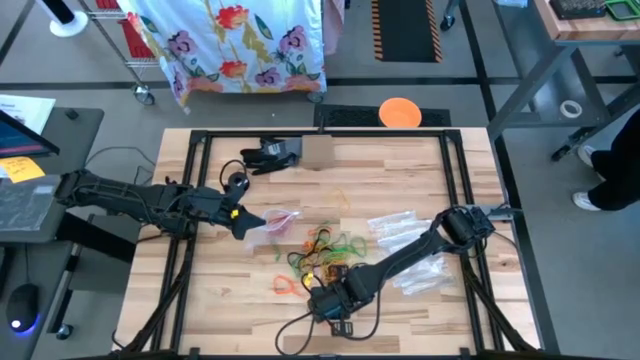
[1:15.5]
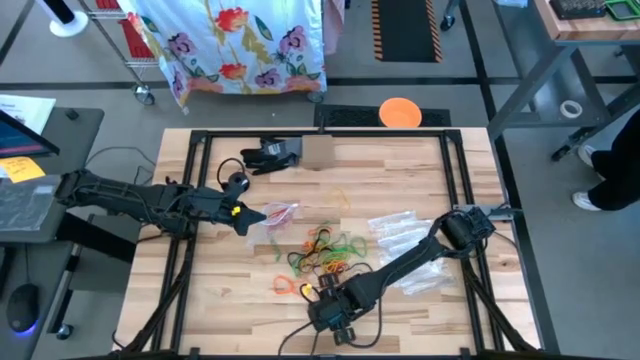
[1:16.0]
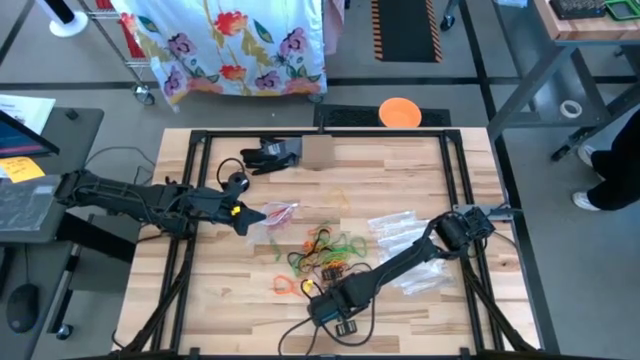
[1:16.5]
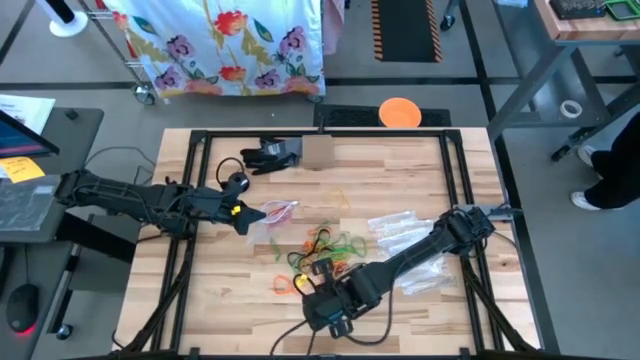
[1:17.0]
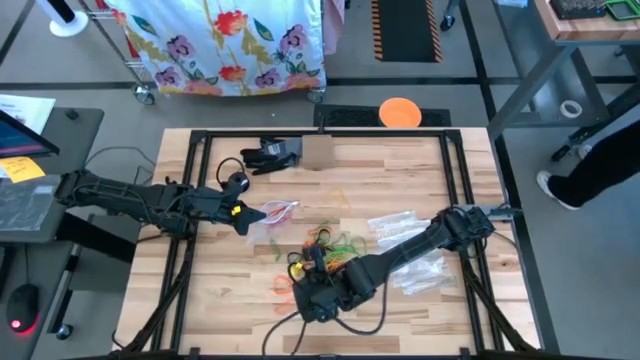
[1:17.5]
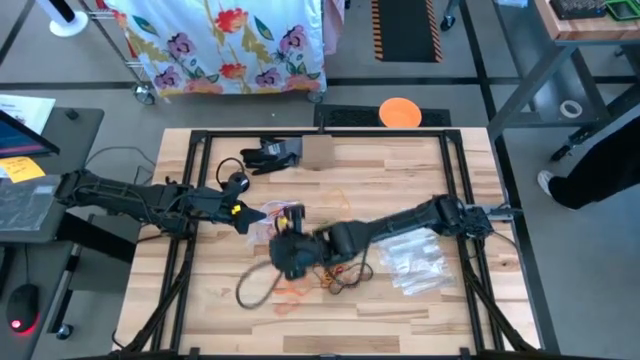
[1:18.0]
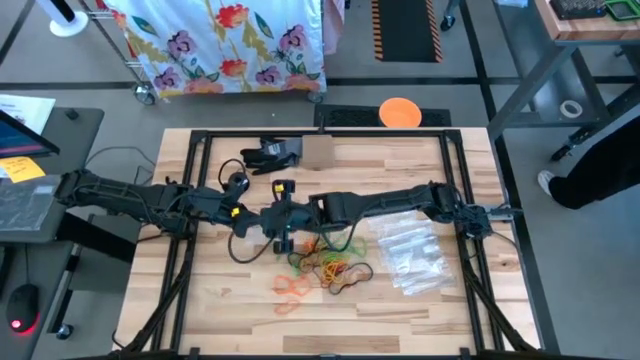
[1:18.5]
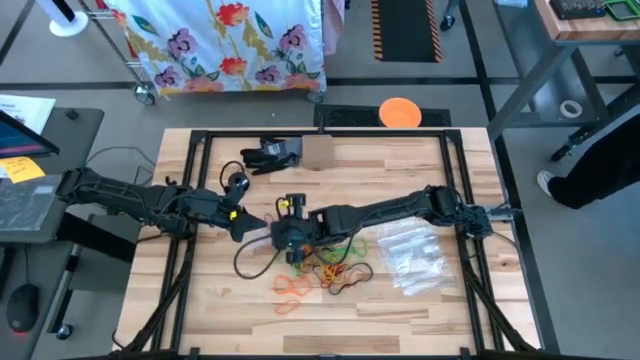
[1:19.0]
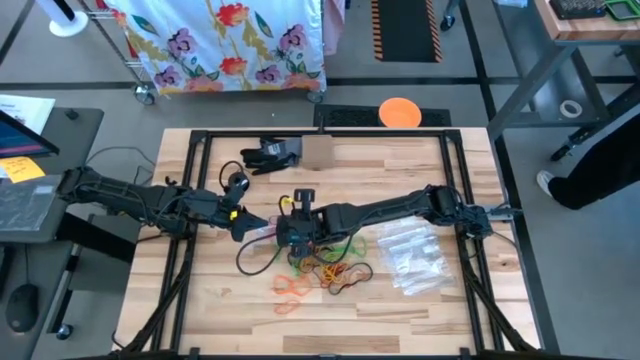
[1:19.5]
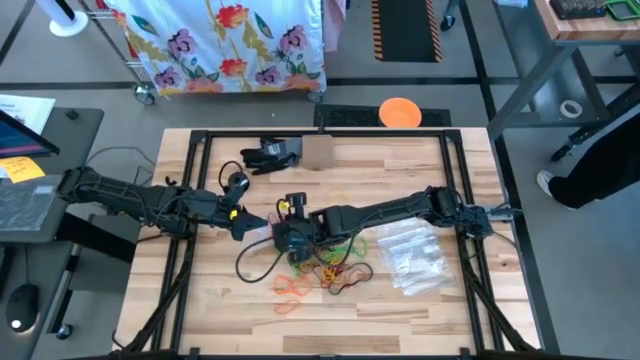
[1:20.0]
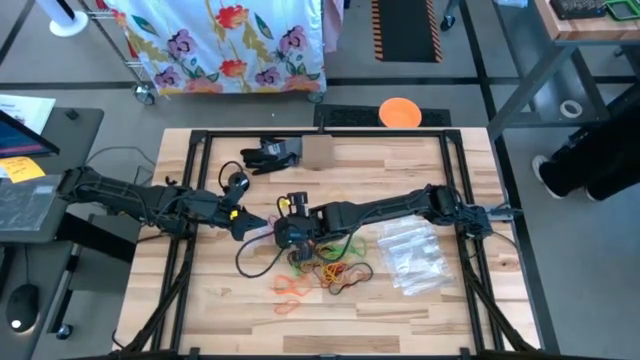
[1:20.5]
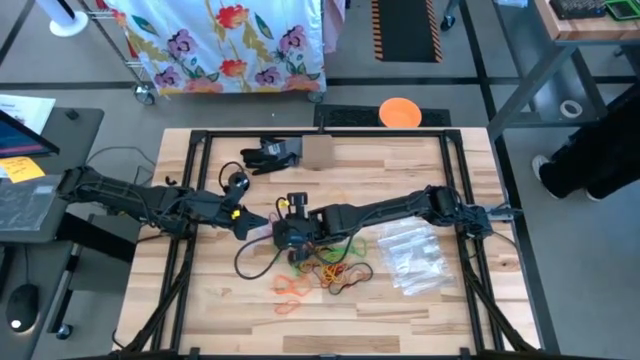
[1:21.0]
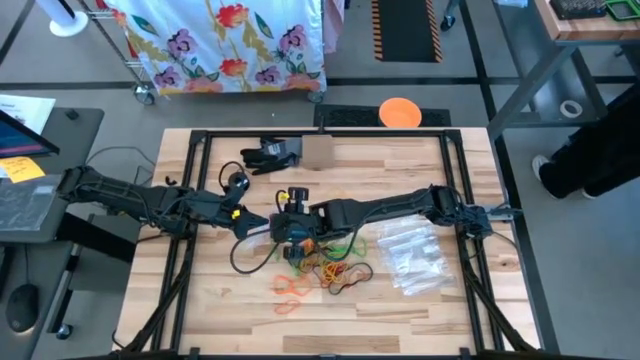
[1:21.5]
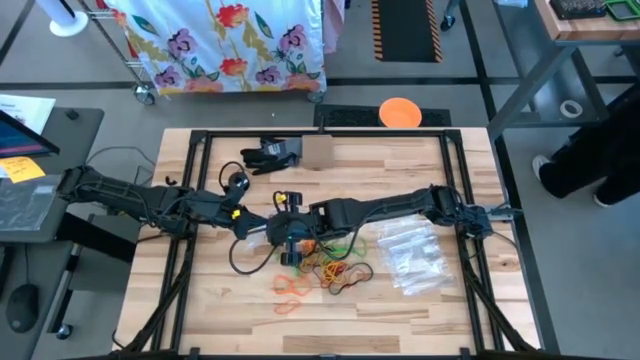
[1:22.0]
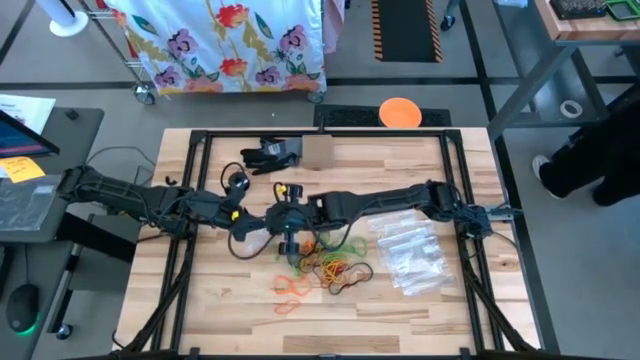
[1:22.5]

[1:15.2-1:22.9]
Task: Sort rubber bands
Put the red rubber band into the transparent zip bag

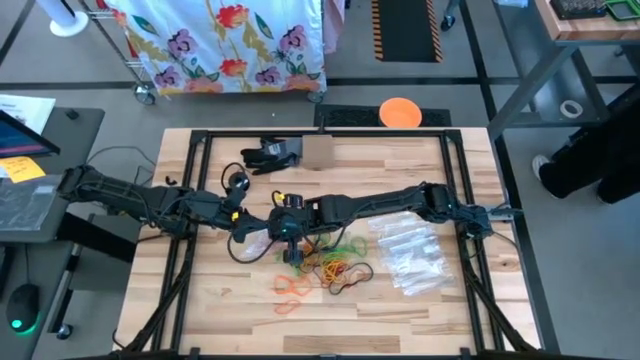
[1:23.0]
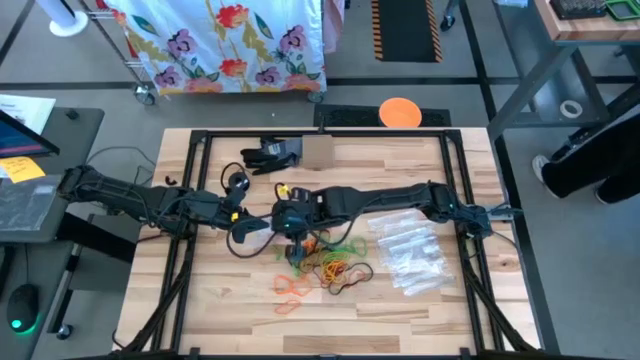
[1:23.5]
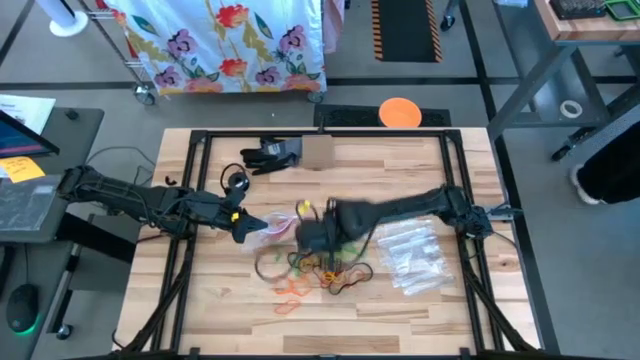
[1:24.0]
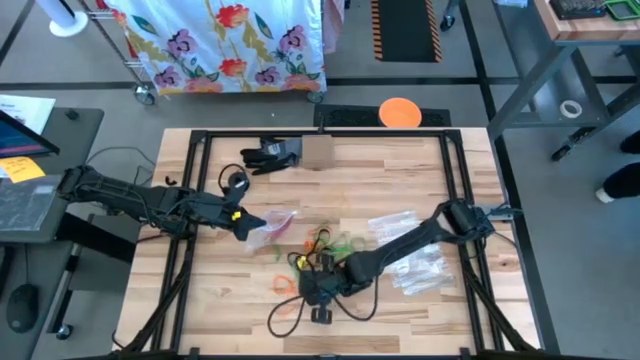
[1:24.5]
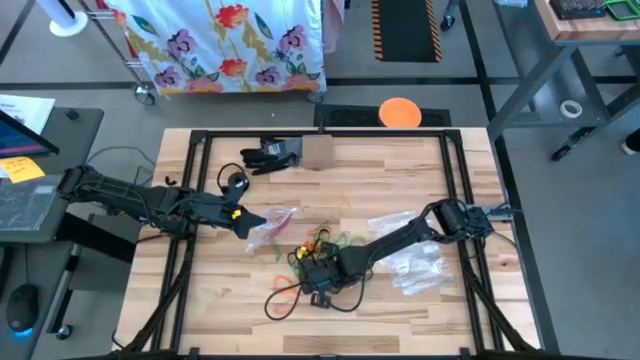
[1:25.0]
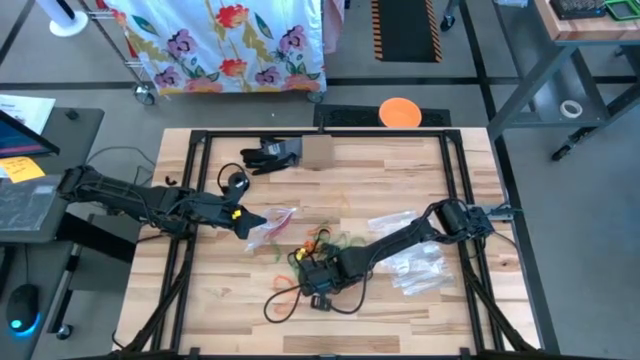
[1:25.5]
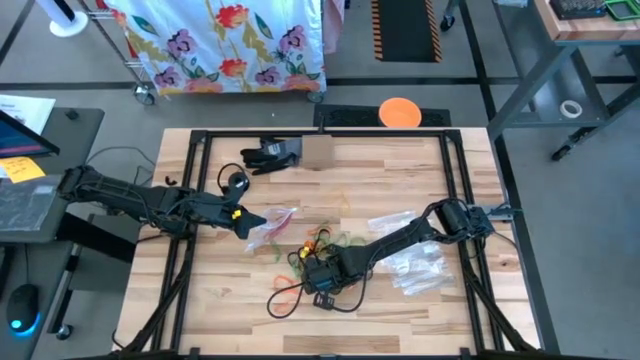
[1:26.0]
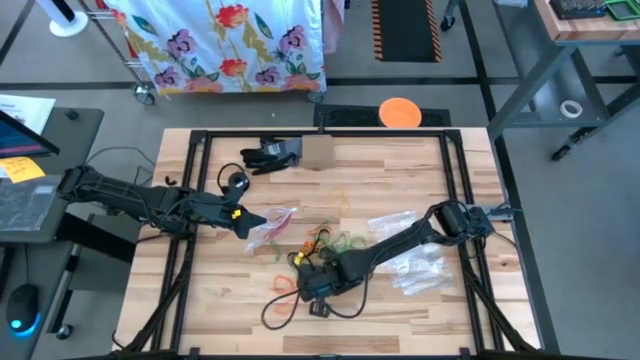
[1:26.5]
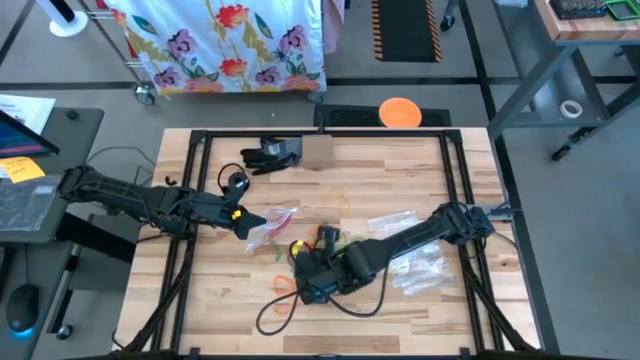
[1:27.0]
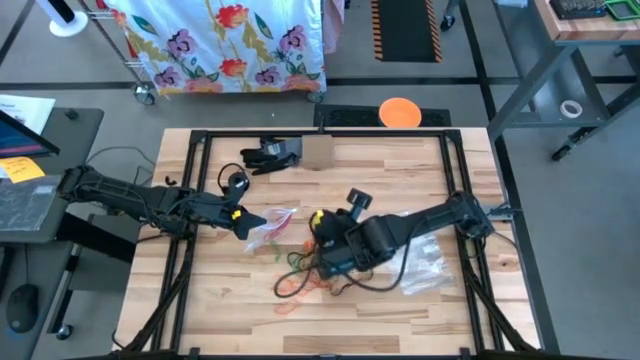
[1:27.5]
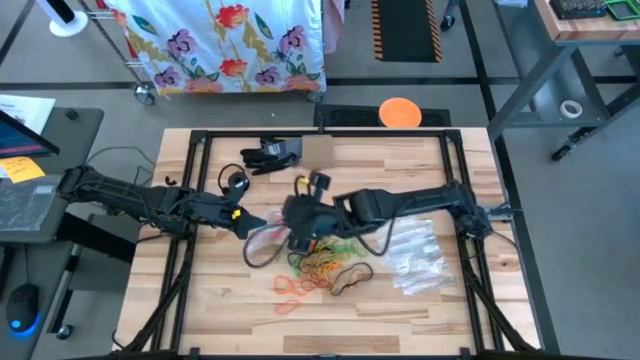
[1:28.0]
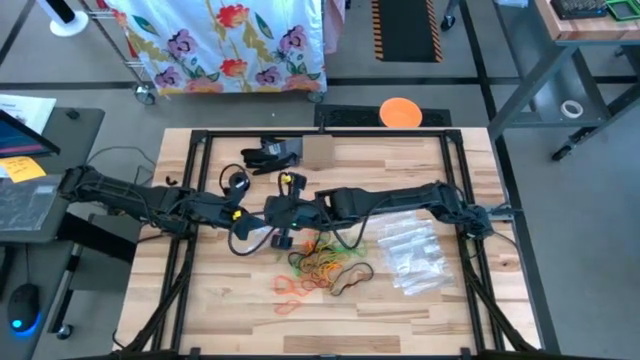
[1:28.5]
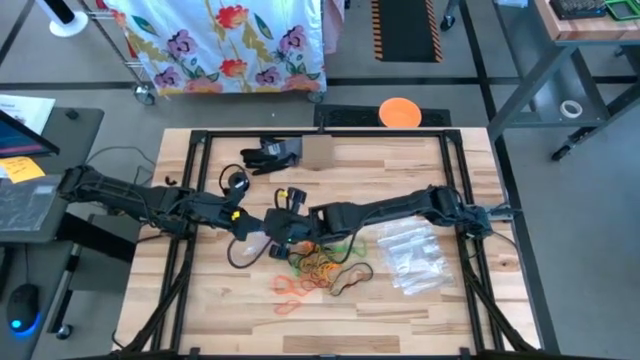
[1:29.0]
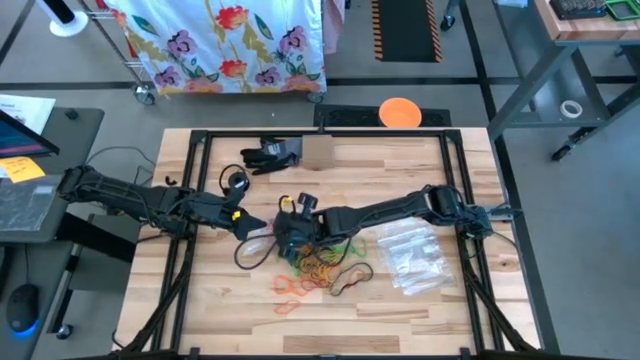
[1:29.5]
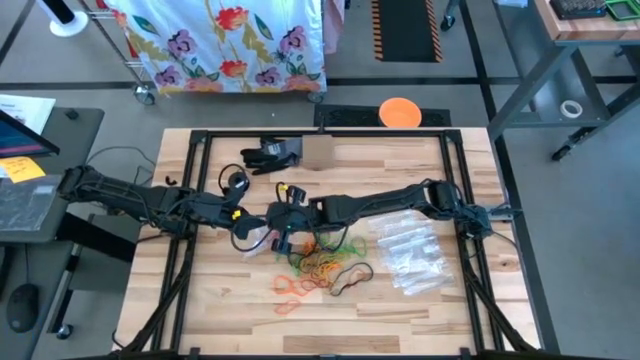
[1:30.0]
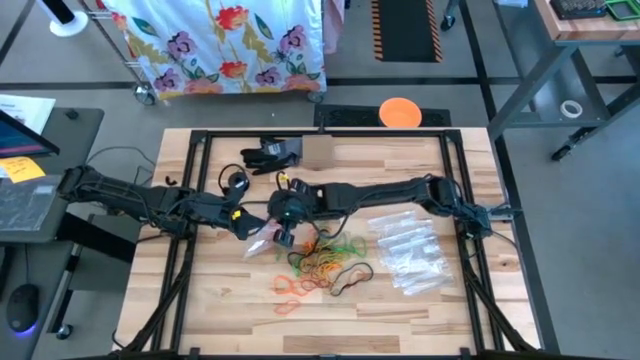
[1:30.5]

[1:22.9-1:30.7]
Put the red rubber band into the transparent zip bag

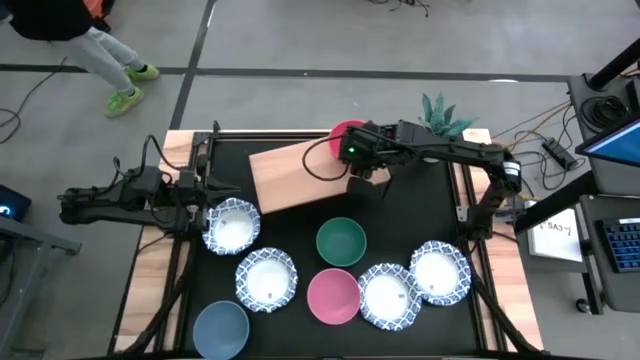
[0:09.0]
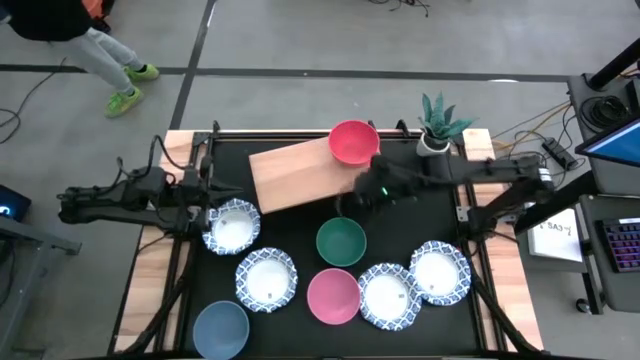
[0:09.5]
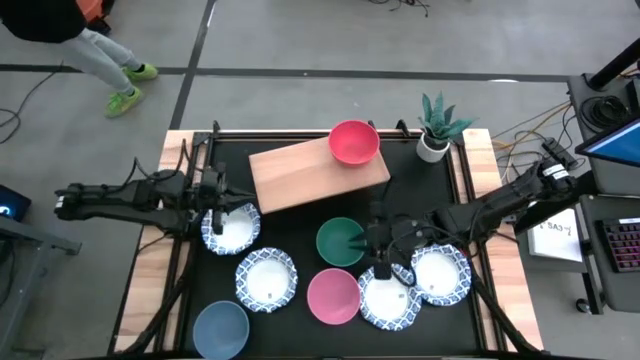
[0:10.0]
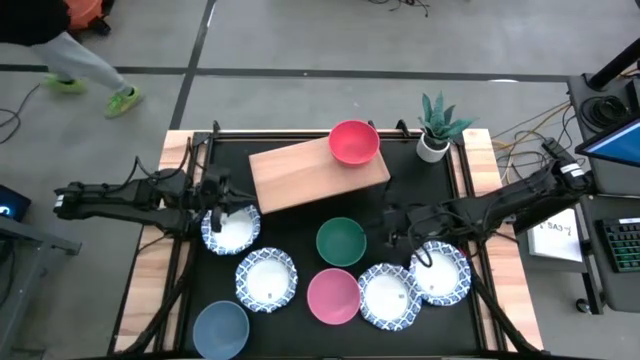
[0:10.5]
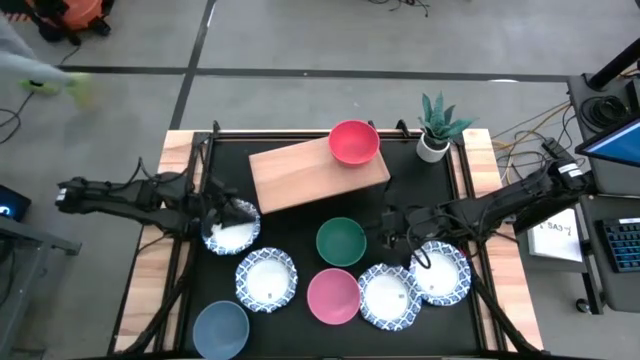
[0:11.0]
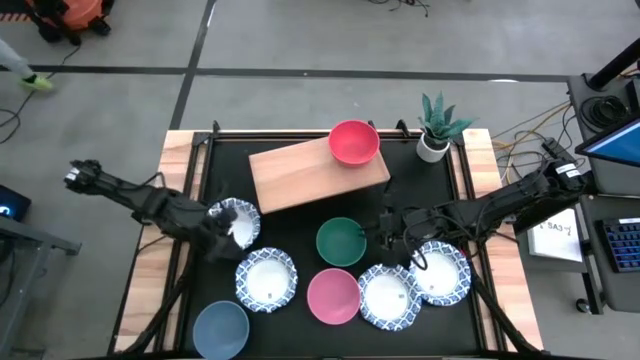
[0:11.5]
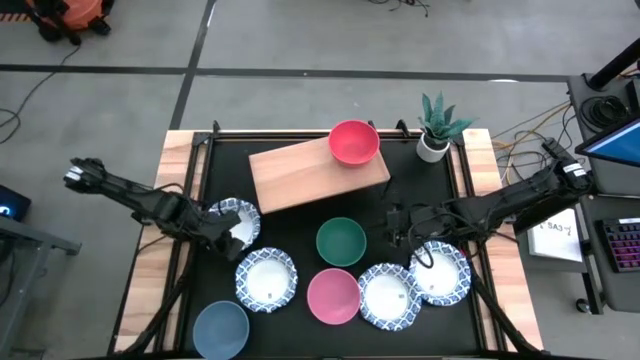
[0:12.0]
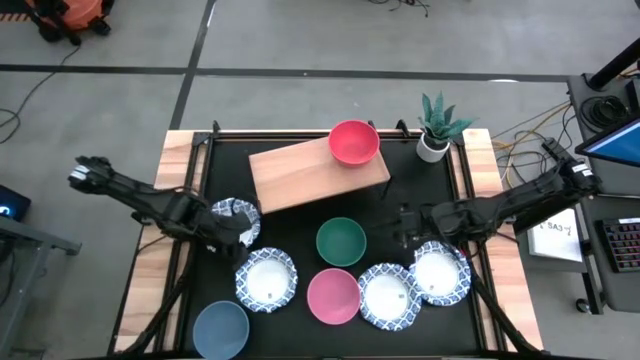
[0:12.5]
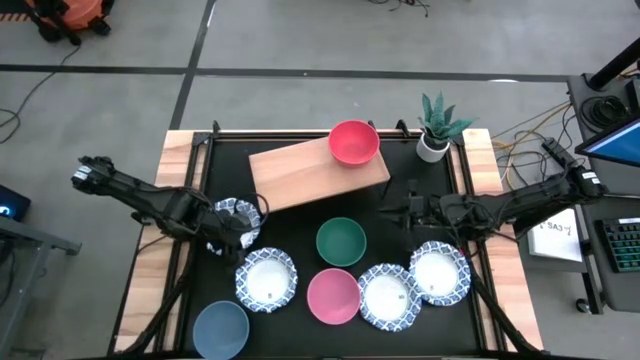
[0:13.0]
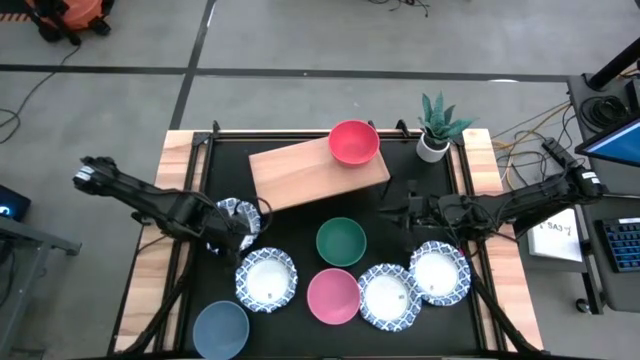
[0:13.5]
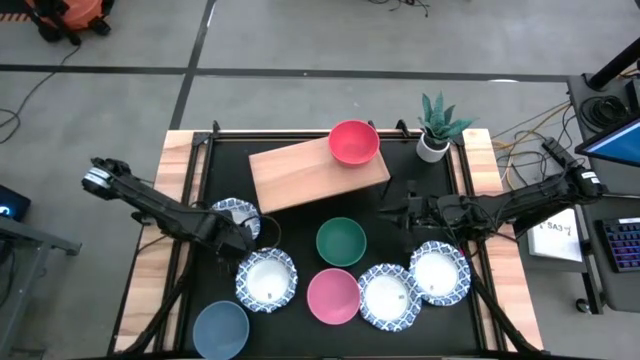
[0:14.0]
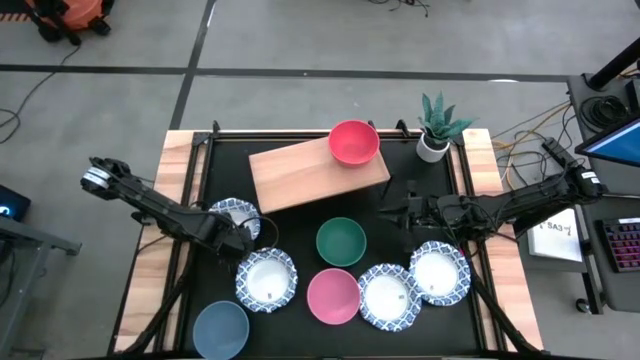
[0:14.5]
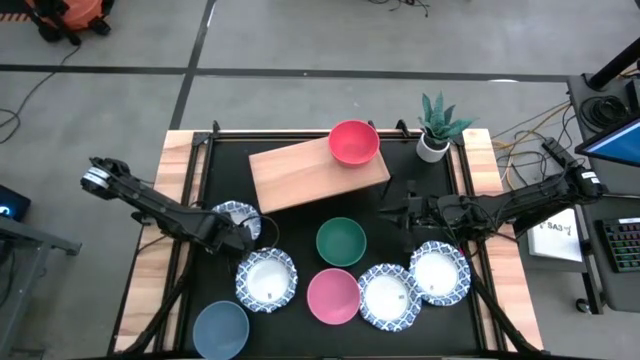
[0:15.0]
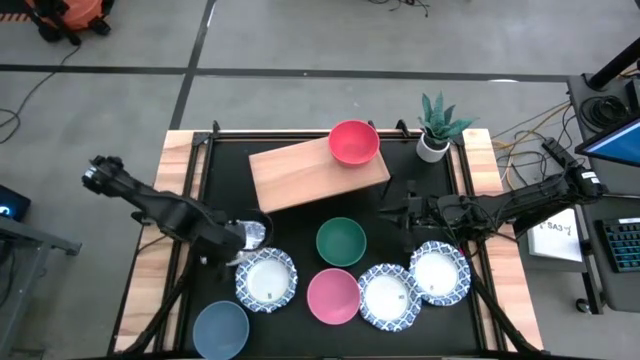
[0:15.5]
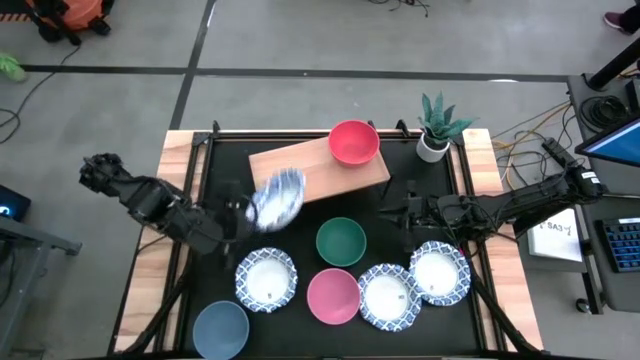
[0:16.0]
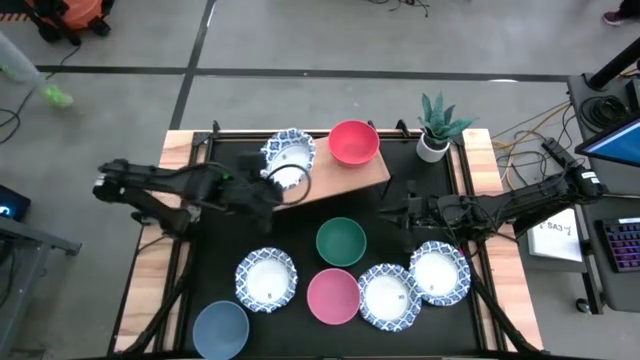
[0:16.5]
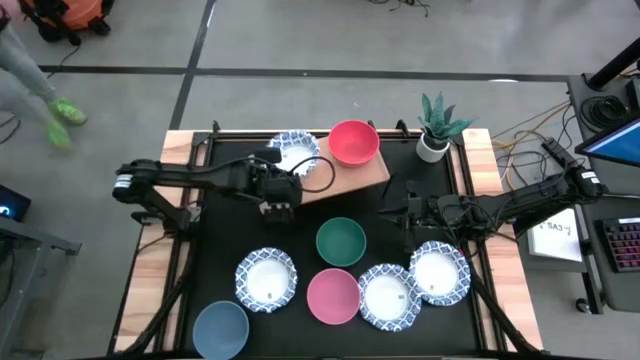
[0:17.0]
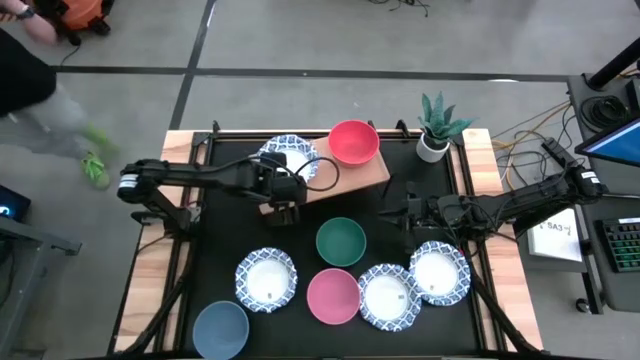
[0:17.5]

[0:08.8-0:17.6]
Task: Place and stack bowls onto a shelf
Put the top left white and blue bowl on the shelf
